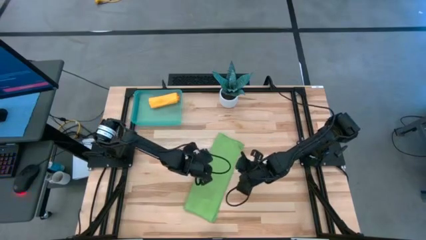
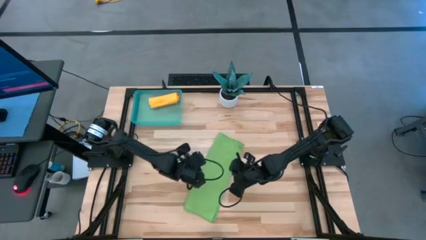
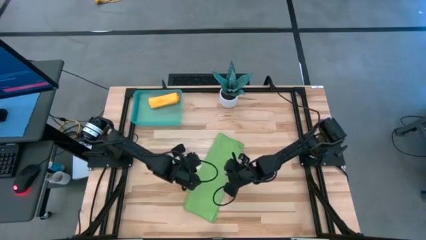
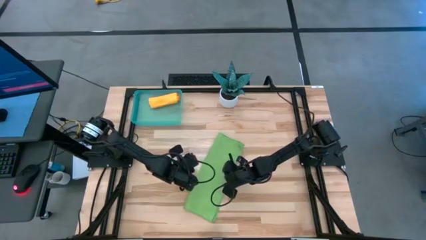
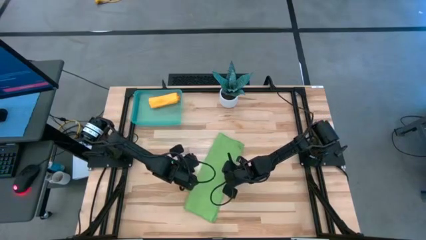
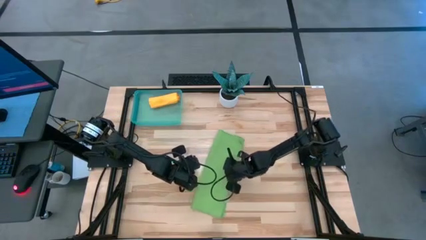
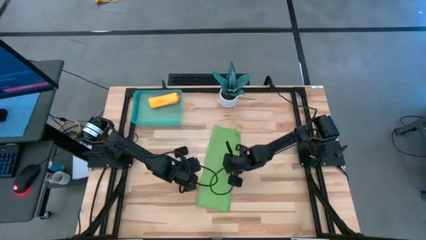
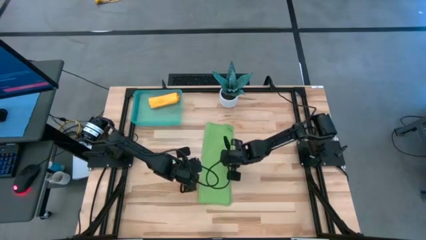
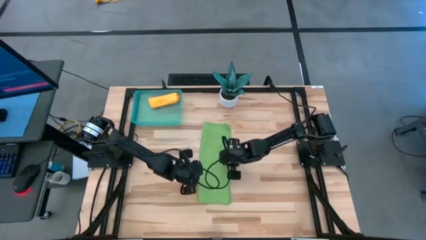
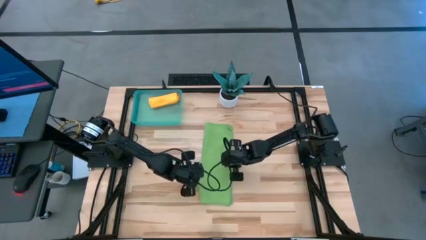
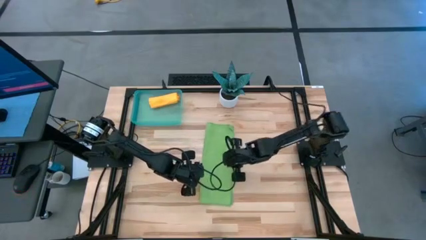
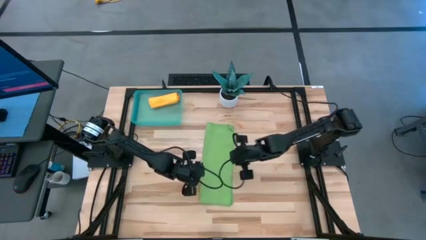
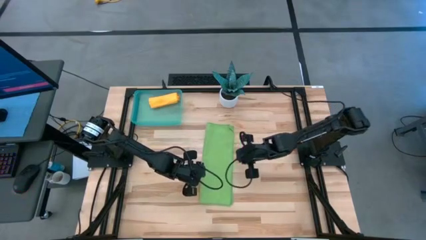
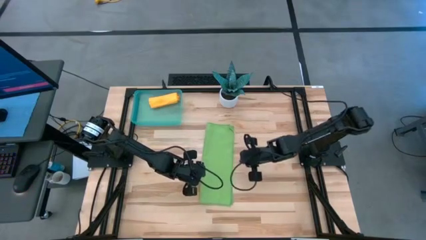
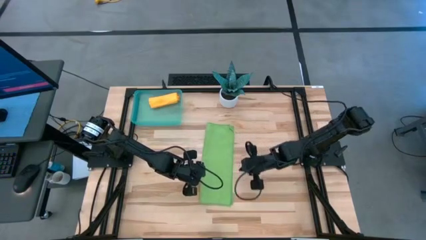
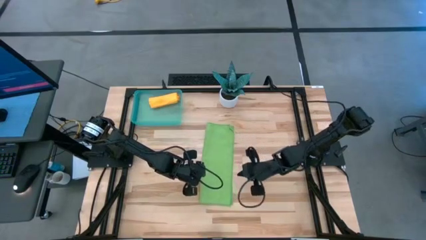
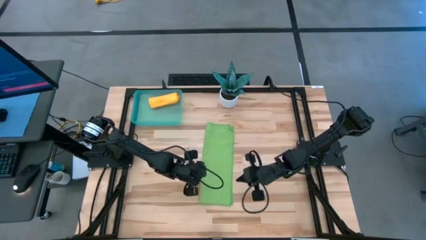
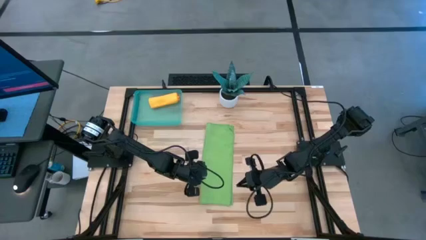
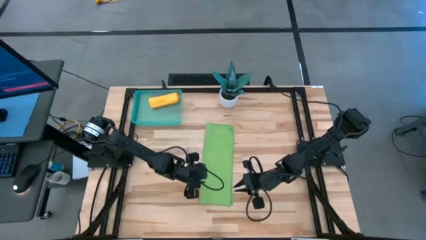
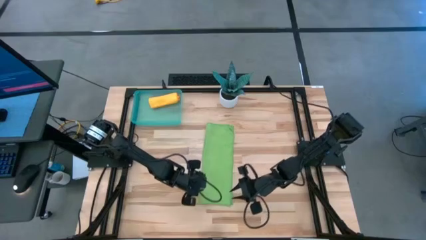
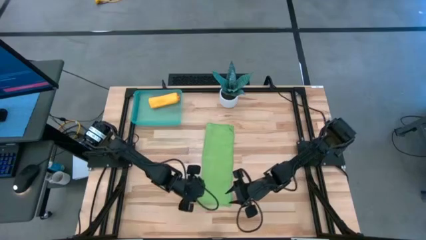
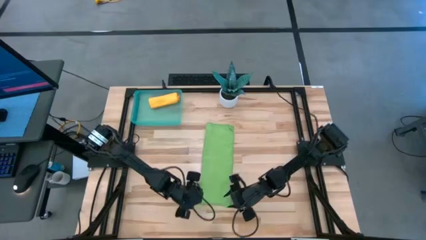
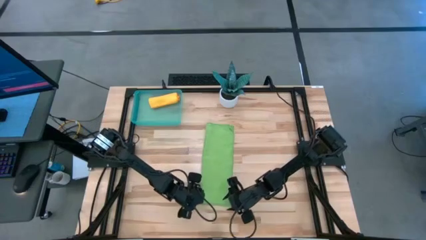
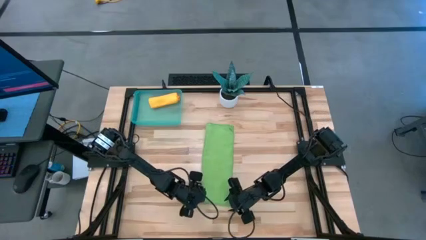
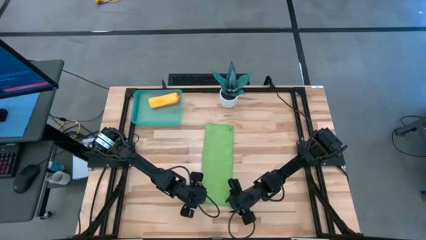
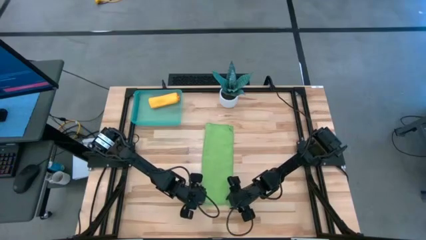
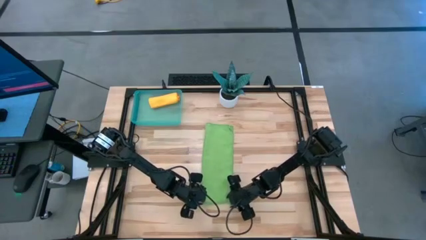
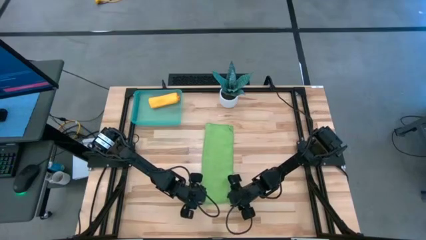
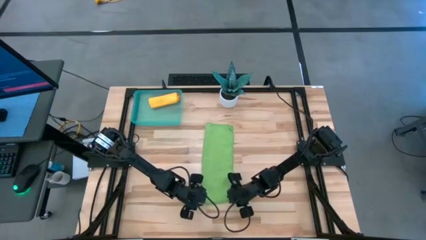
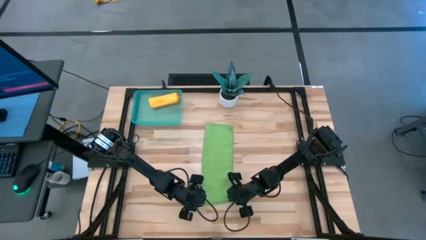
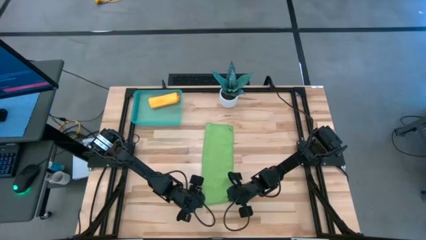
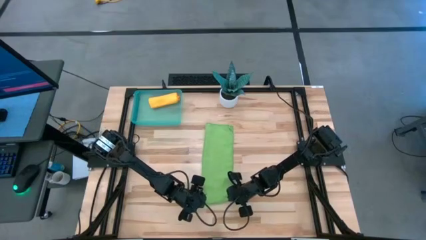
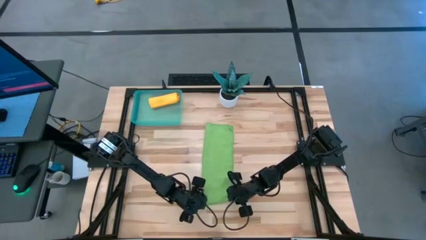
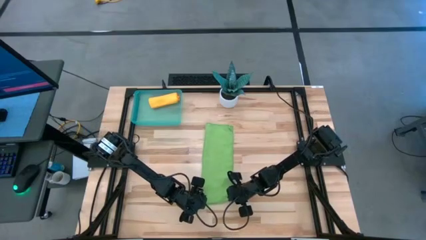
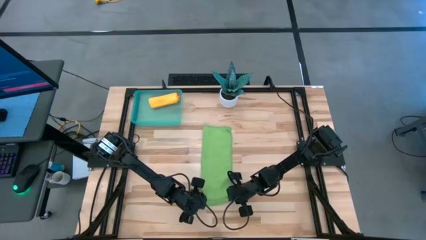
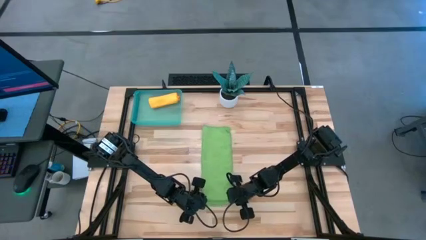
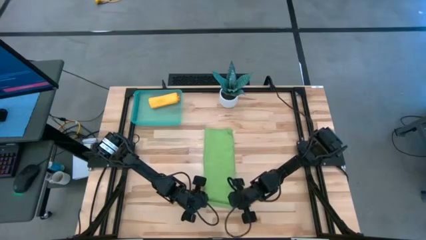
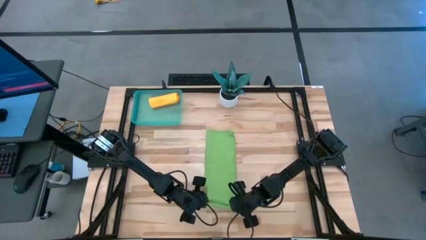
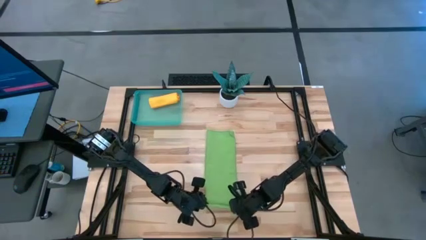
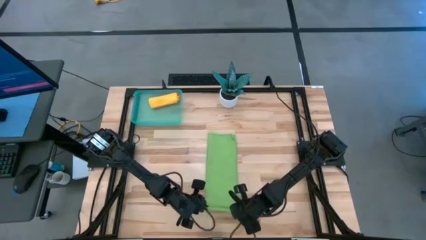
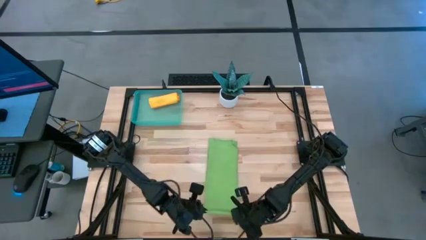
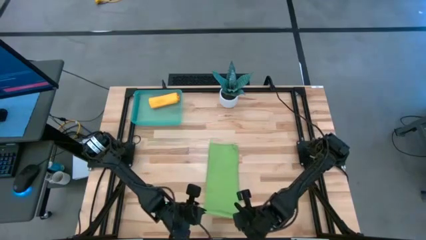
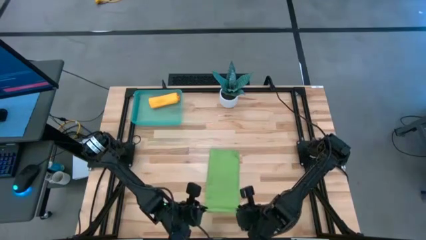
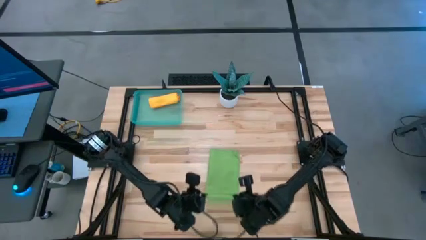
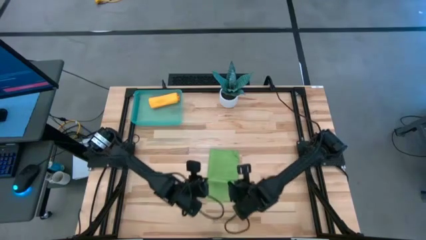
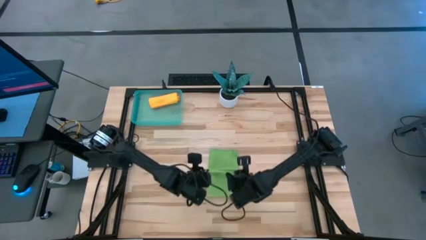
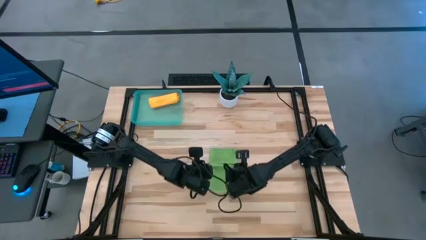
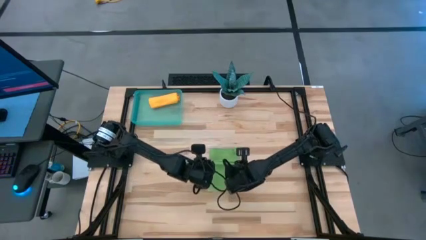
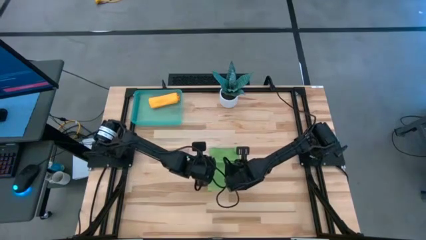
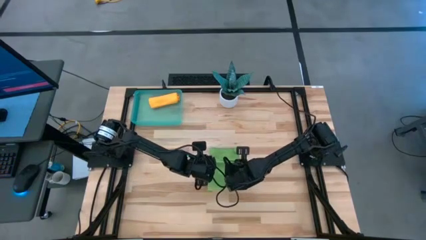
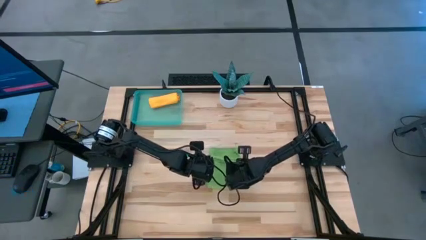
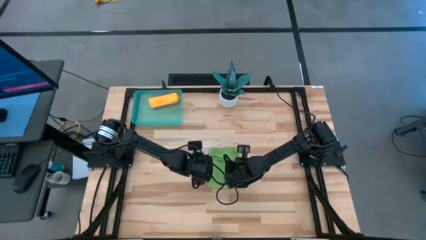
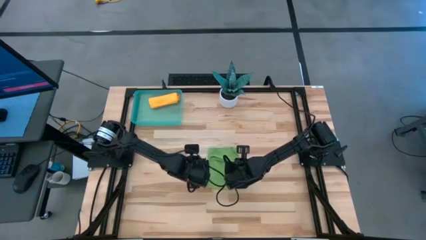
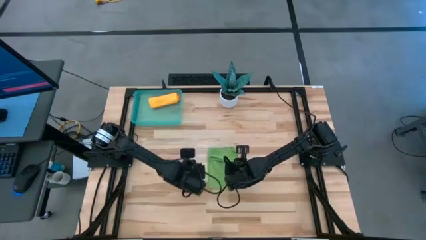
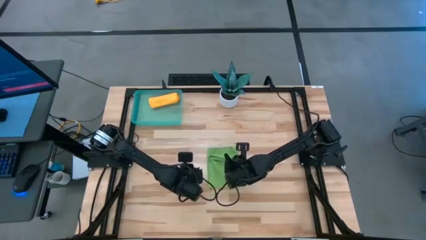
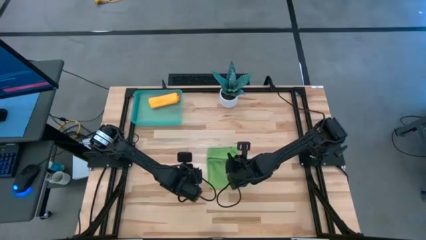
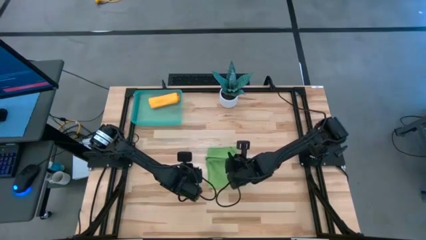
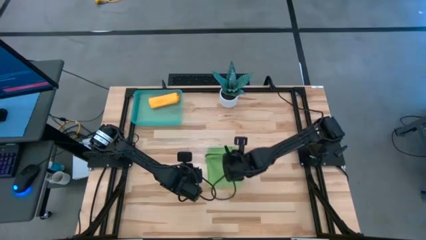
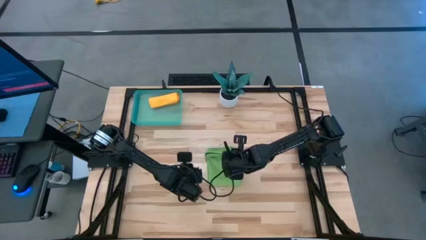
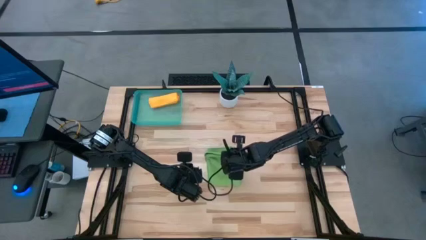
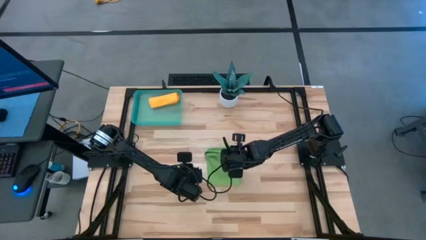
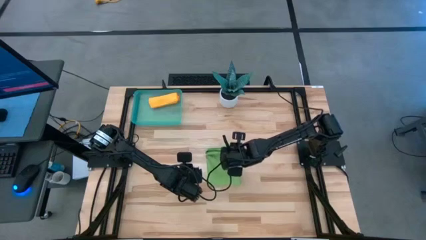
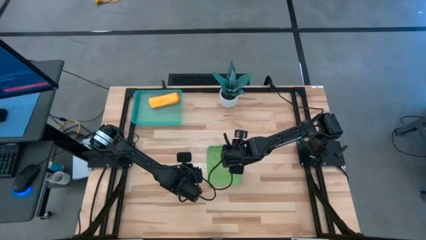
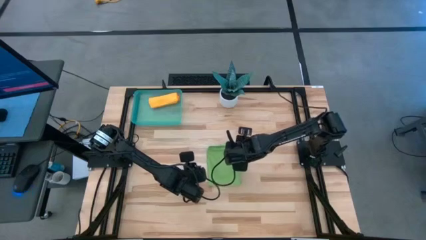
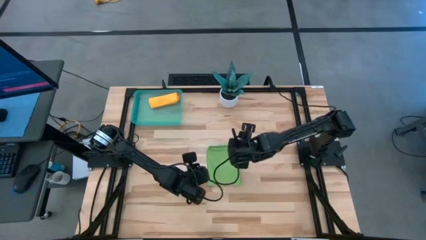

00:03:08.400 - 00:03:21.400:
Task: Roll microfiber towels into tight, uniform cylinder then place into a basket
Fold the light green microfiber cloth

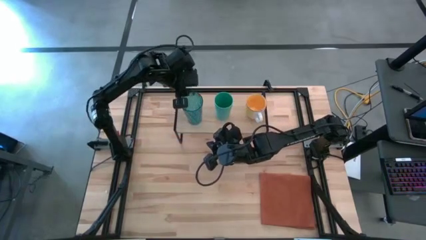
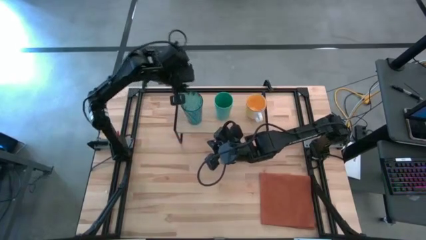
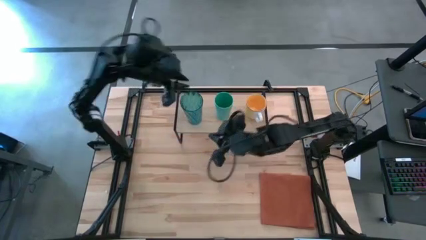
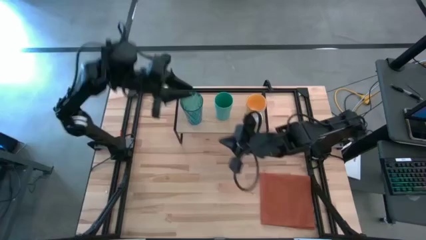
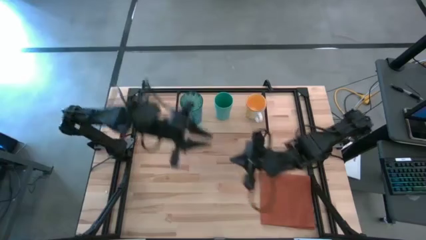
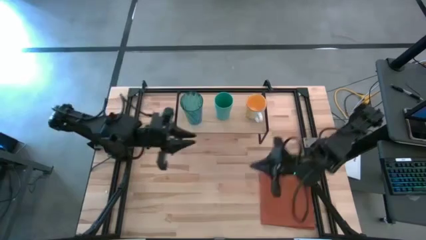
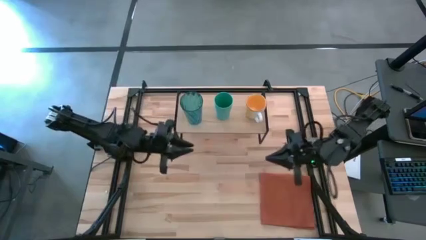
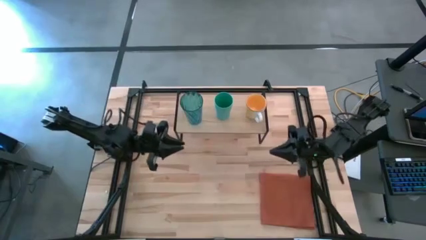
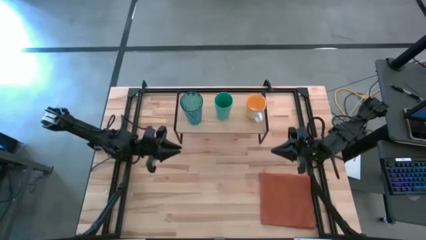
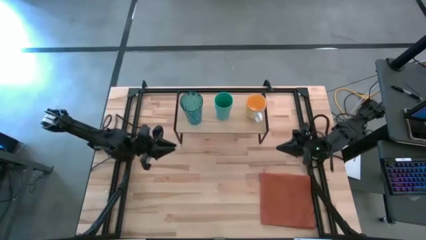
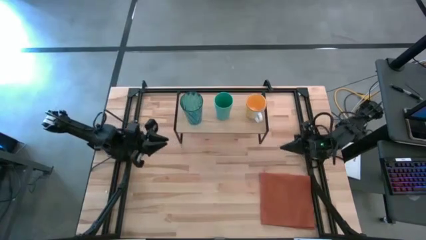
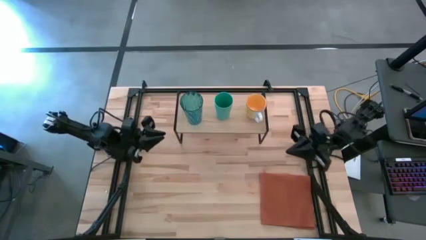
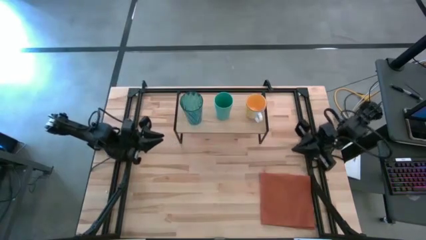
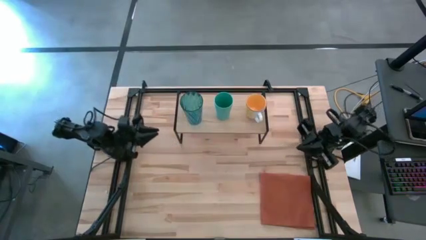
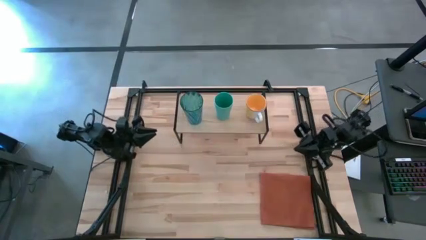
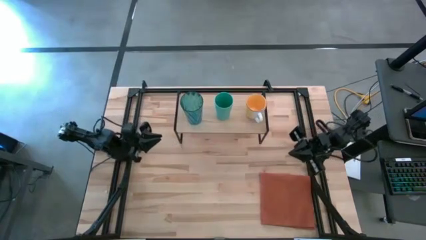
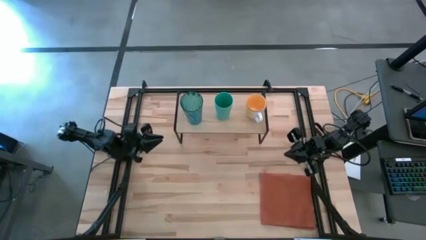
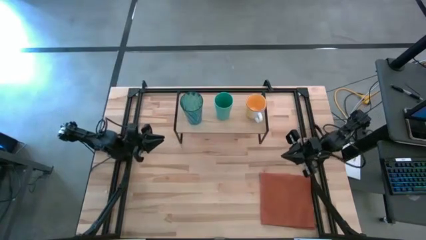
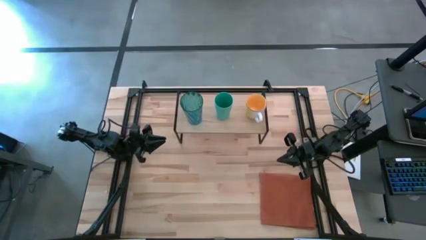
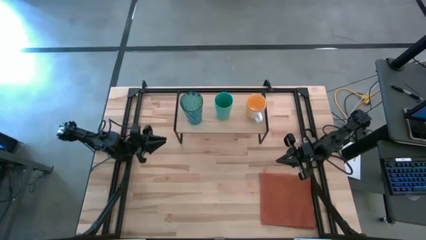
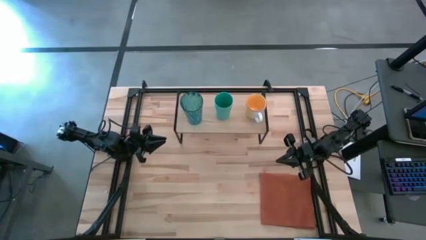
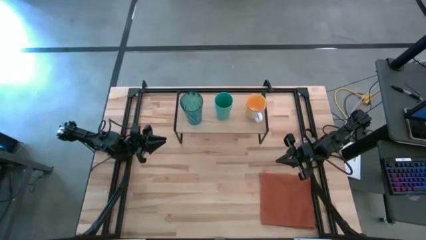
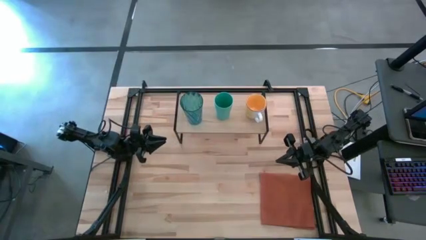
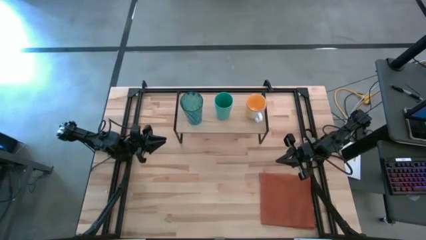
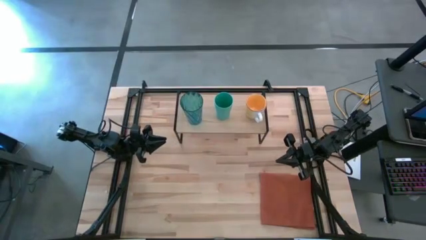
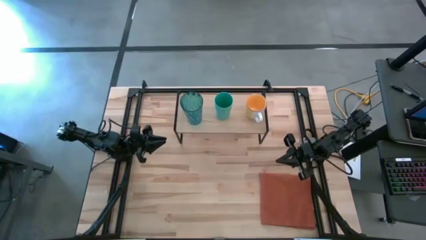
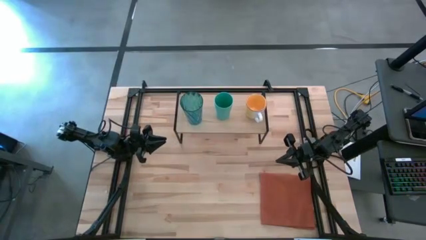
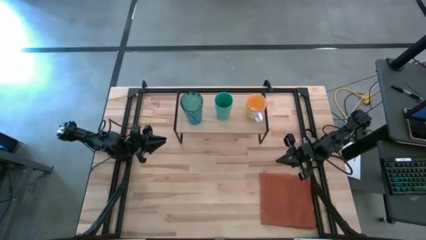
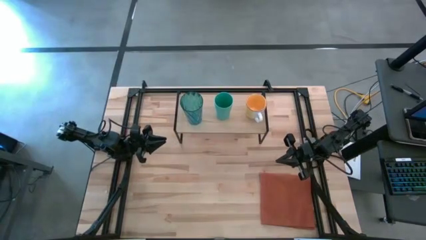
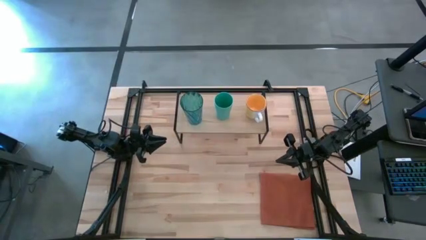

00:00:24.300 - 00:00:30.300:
Task: Stack small to large cups/mugs on shelf
Return to Home Position
